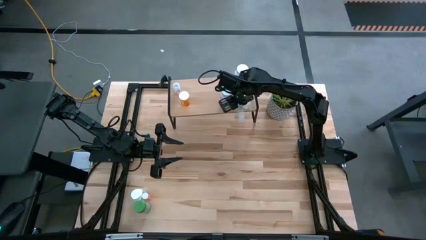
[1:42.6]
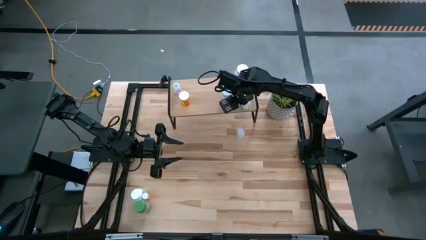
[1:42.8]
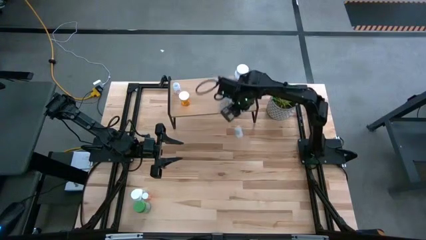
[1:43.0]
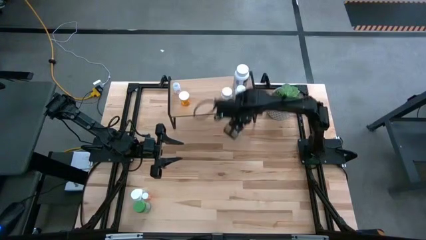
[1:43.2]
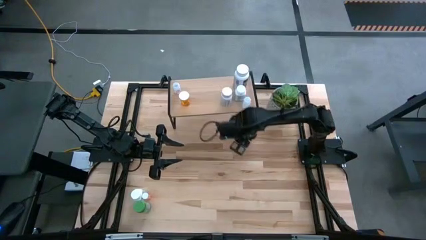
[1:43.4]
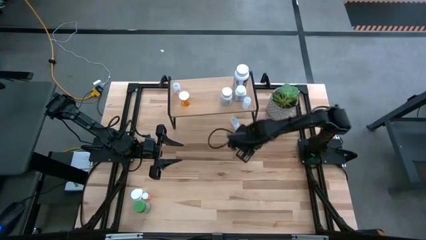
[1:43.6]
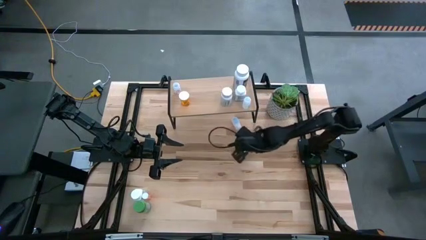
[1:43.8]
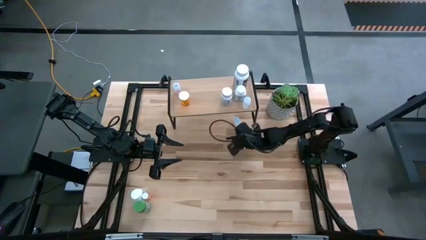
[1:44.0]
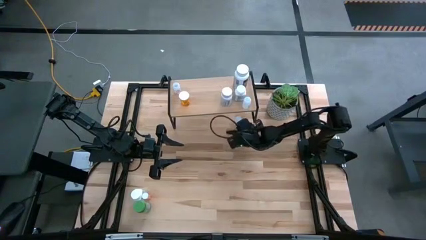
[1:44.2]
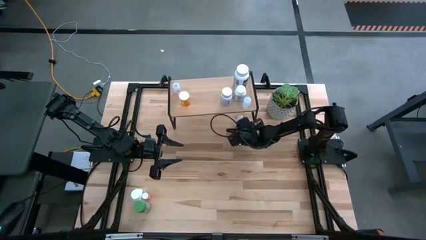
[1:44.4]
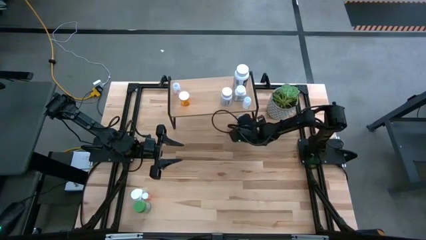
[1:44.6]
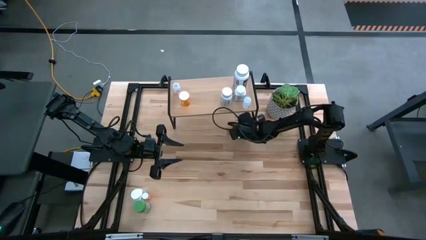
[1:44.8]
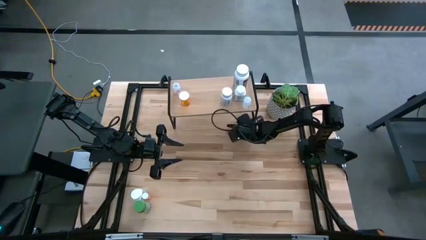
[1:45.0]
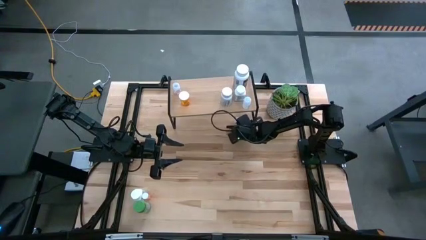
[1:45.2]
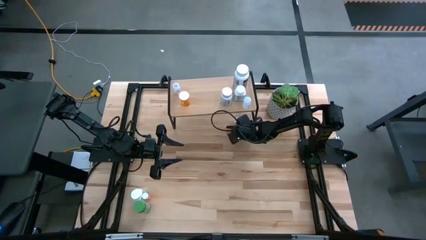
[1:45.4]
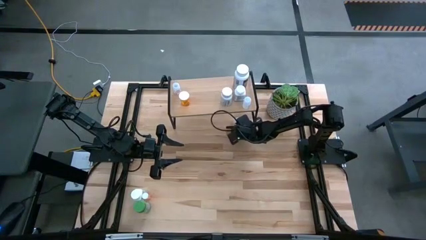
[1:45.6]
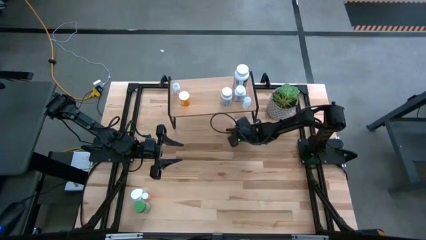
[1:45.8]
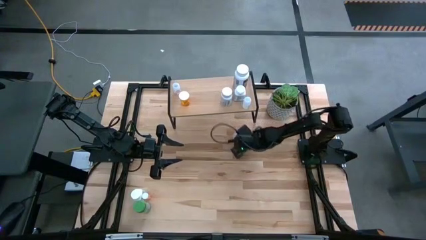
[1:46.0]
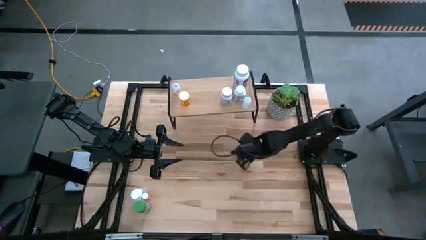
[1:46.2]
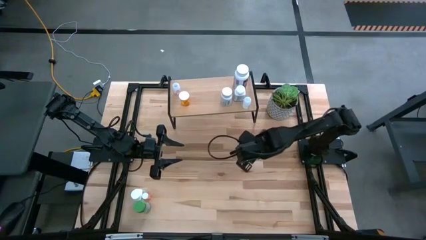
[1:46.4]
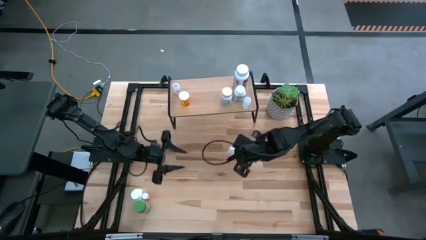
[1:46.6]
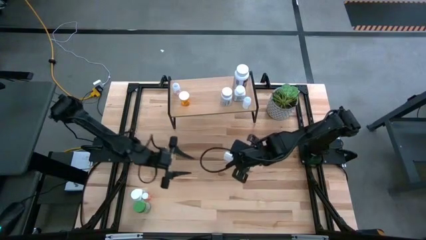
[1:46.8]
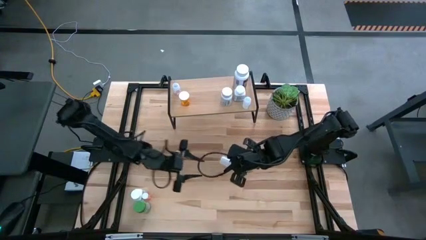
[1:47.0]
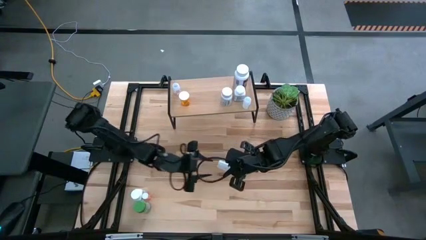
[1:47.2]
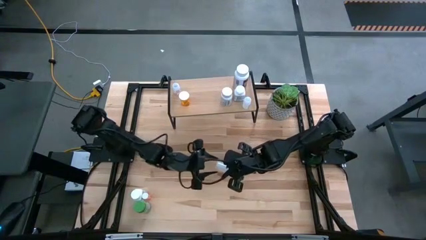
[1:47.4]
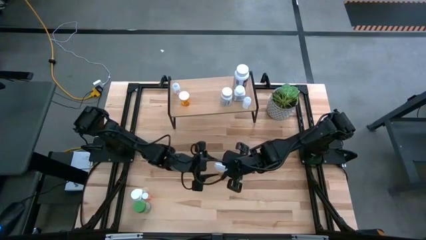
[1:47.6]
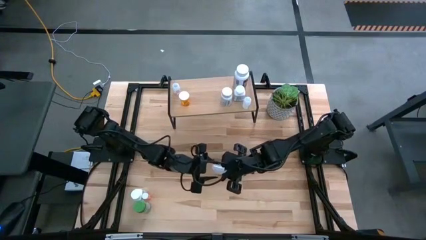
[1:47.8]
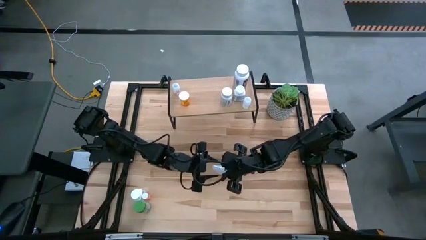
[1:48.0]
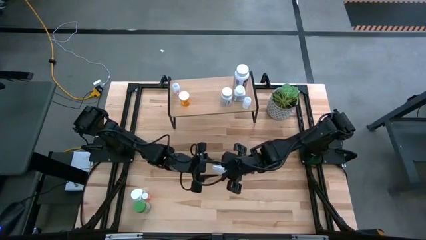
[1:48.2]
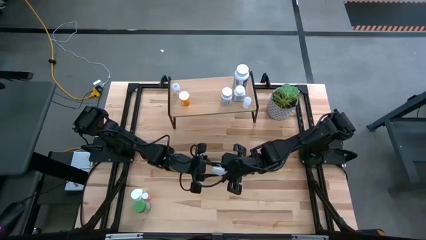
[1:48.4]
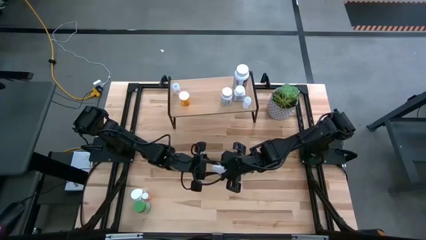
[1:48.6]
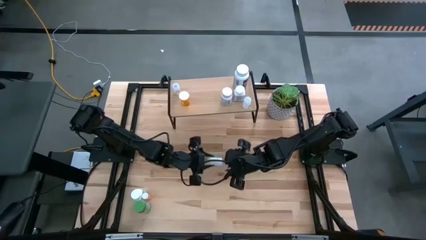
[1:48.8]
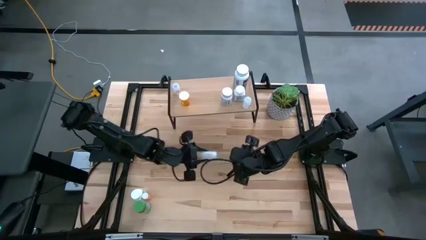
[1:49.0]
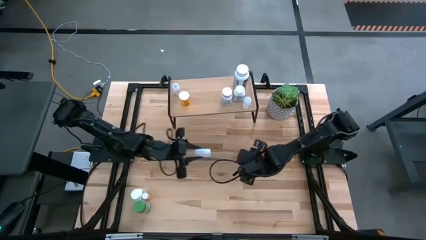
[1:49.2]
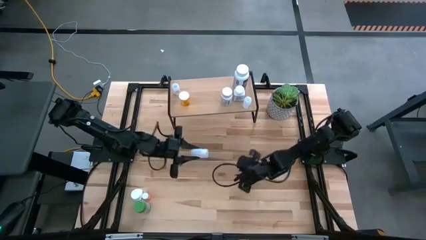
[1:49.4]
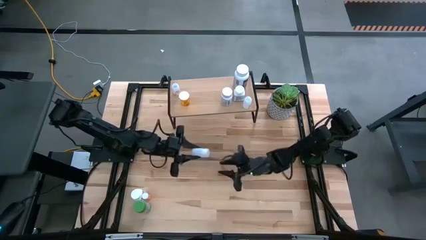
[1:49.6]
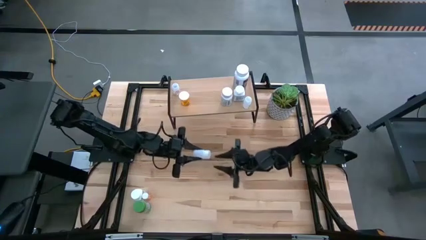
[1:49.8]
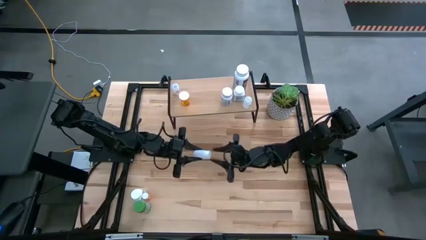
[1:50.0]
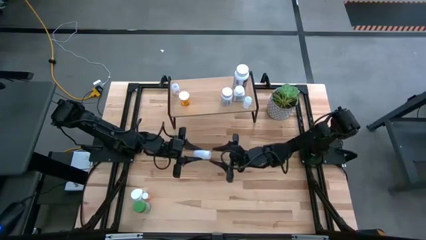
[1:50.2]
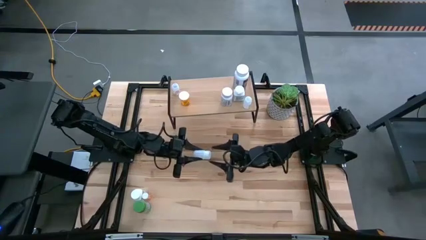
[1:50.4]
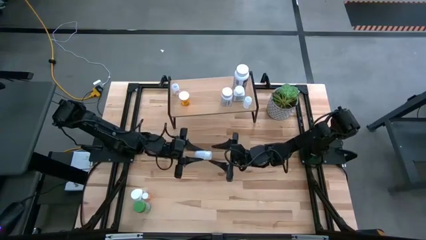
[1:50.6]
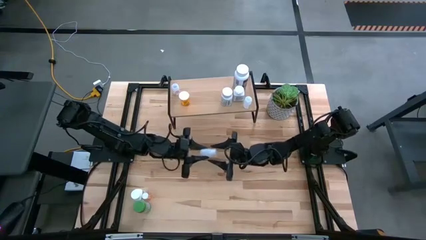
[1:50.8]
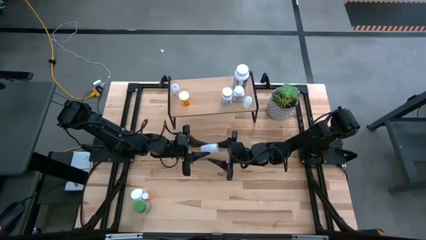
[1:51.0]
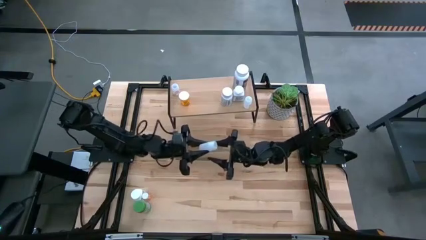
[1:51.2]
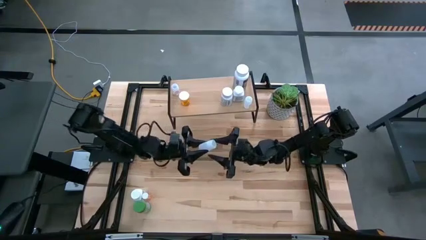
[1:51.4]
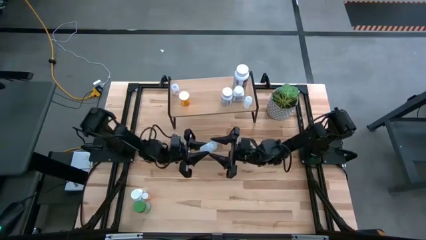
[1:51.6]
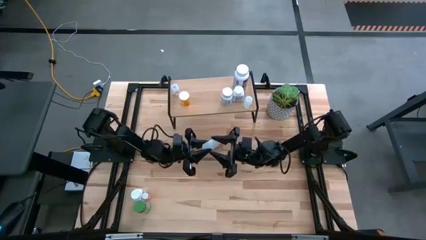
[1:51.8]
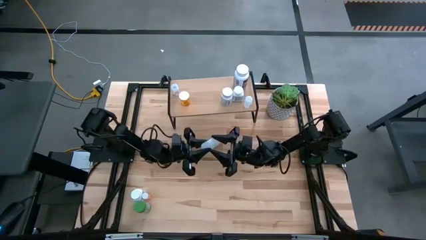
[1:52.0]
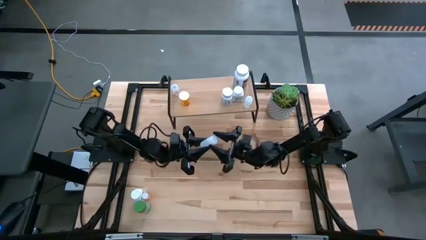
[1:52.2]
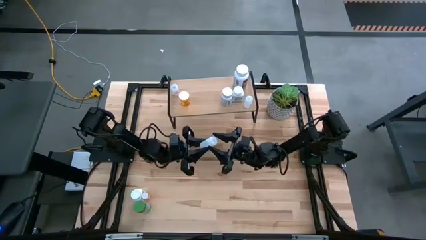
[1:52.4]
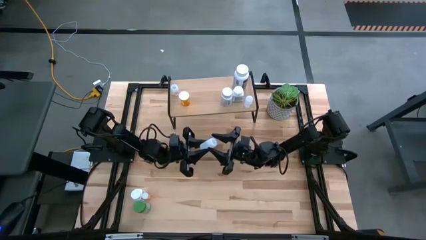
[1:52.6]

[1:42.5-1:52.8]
Task: Pick and place medicine bottles onto shelf by color
Put the transparent pill bottle on the shelf

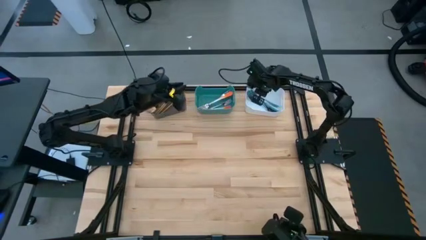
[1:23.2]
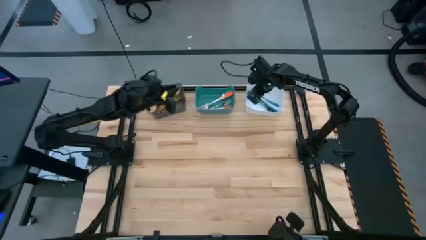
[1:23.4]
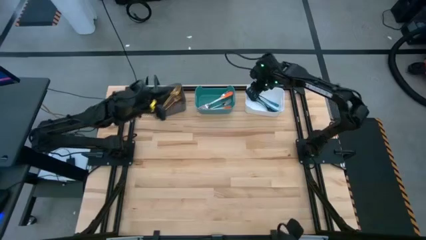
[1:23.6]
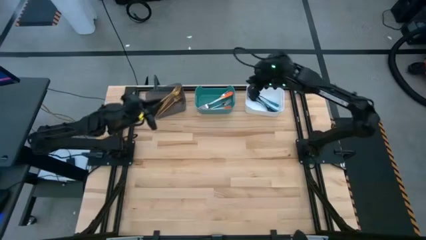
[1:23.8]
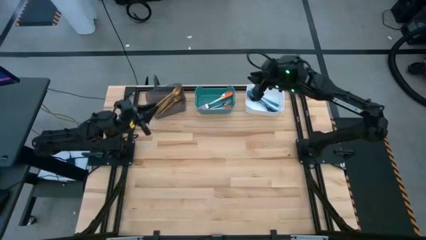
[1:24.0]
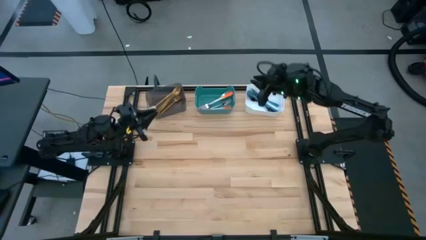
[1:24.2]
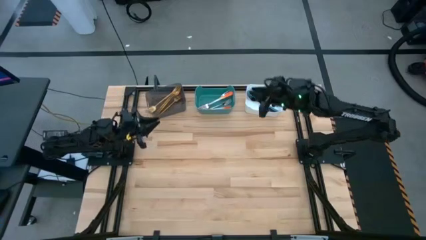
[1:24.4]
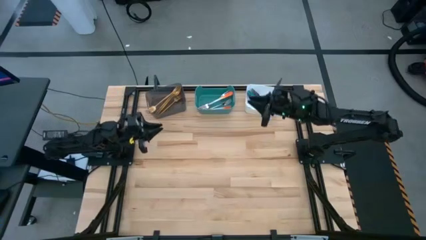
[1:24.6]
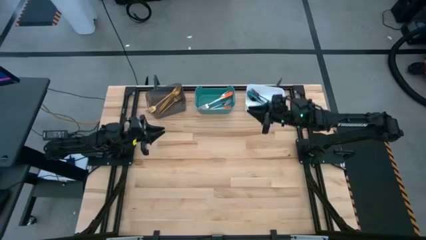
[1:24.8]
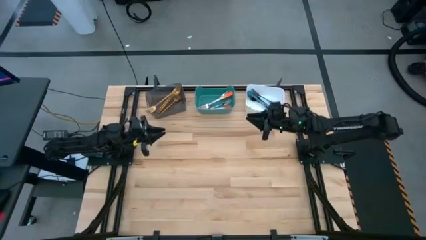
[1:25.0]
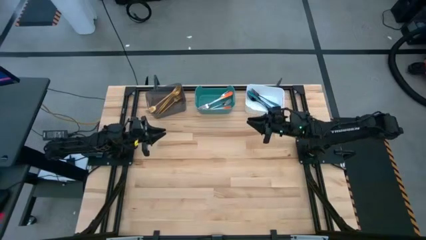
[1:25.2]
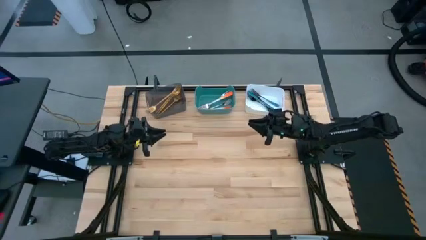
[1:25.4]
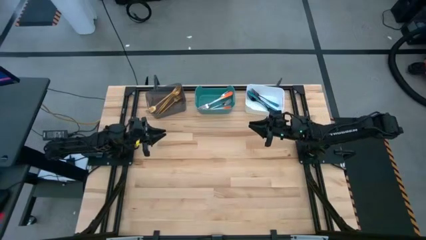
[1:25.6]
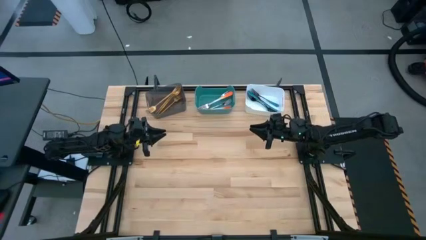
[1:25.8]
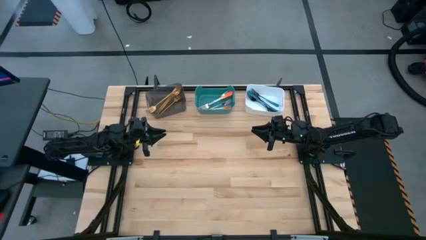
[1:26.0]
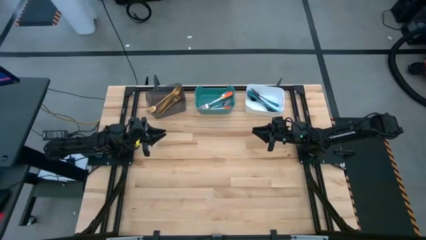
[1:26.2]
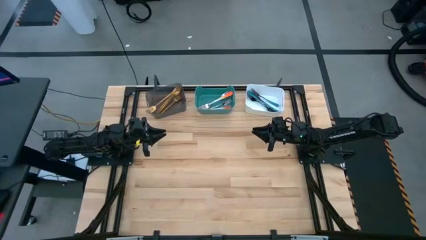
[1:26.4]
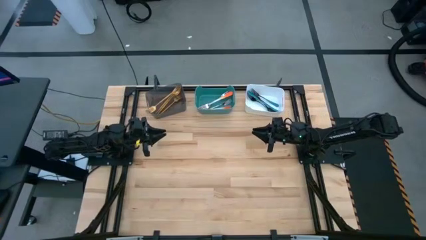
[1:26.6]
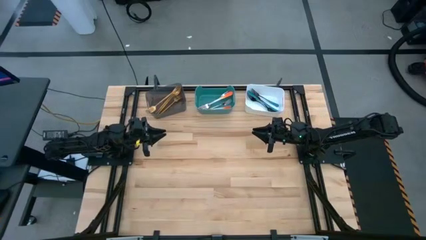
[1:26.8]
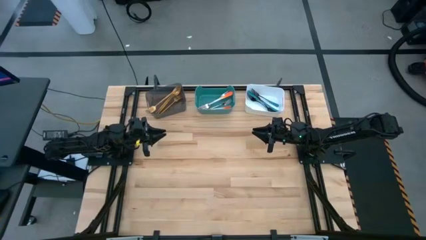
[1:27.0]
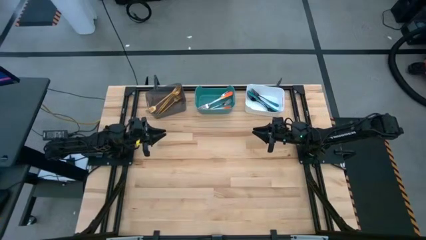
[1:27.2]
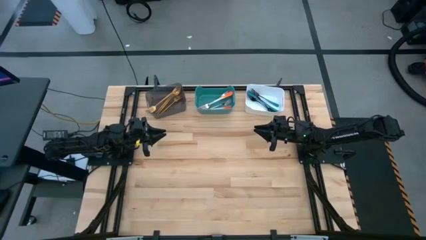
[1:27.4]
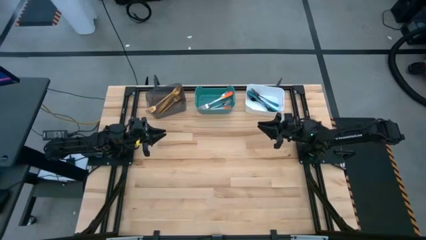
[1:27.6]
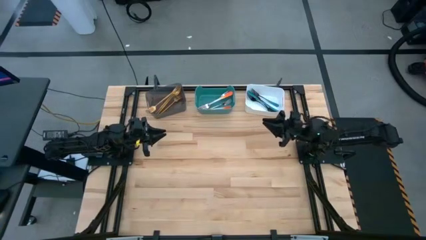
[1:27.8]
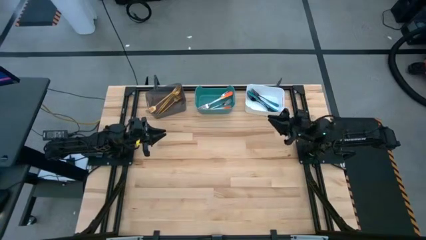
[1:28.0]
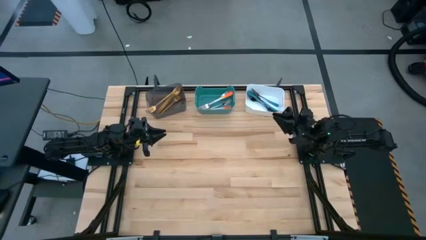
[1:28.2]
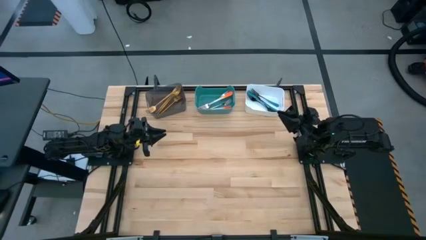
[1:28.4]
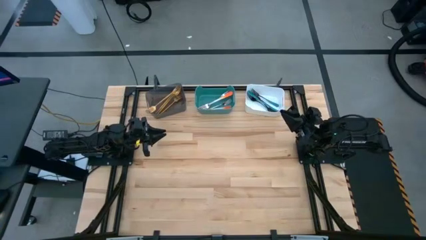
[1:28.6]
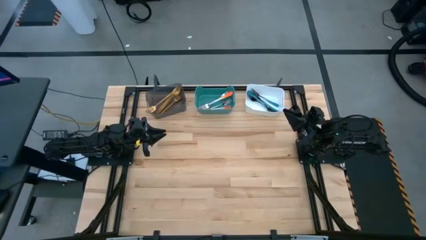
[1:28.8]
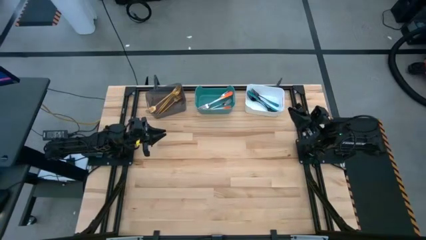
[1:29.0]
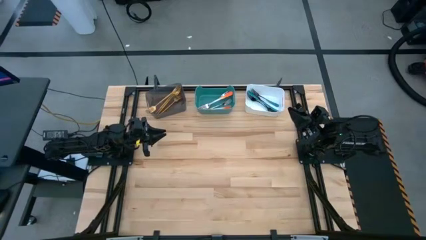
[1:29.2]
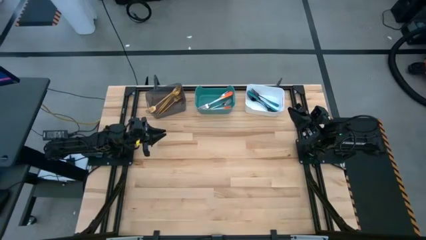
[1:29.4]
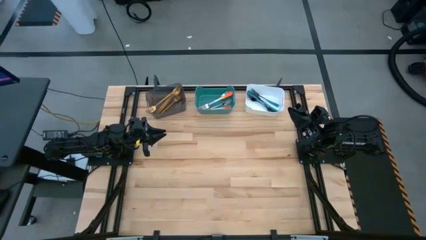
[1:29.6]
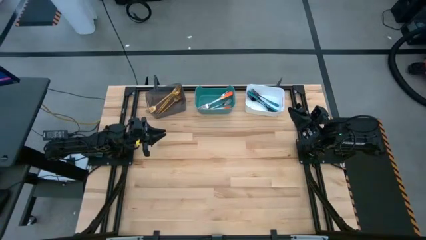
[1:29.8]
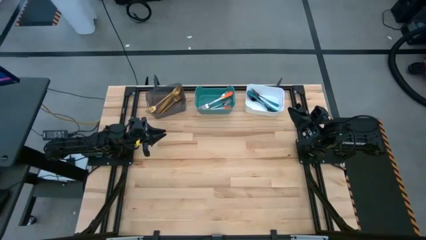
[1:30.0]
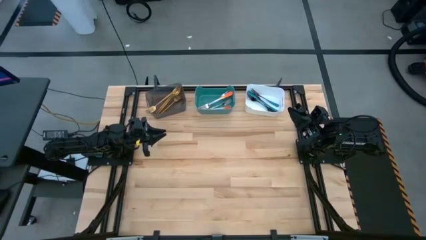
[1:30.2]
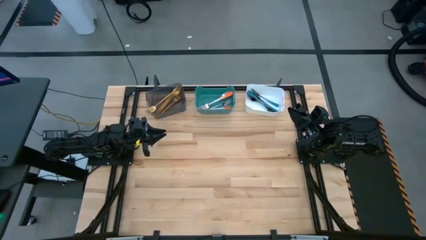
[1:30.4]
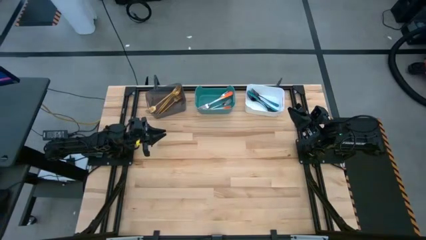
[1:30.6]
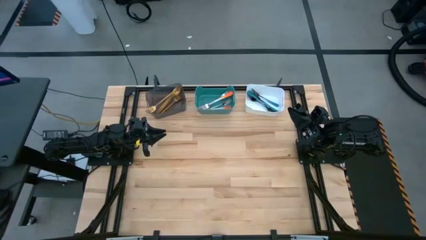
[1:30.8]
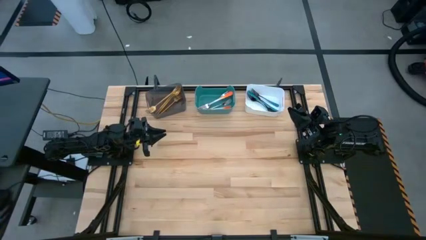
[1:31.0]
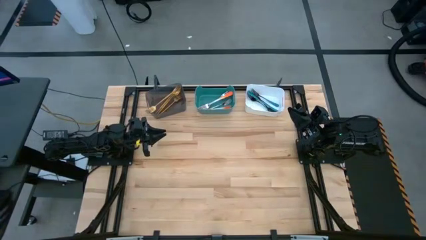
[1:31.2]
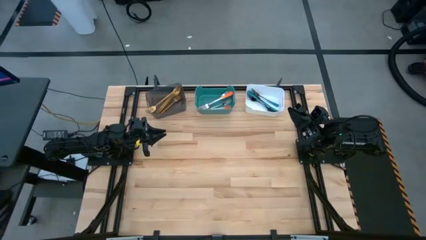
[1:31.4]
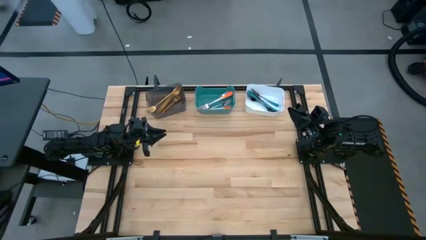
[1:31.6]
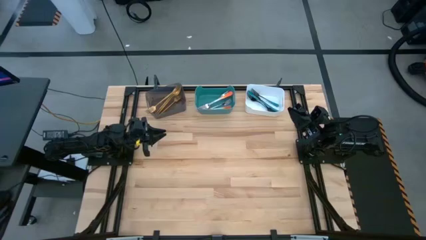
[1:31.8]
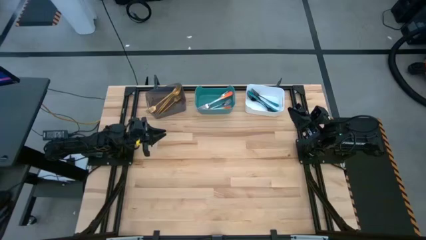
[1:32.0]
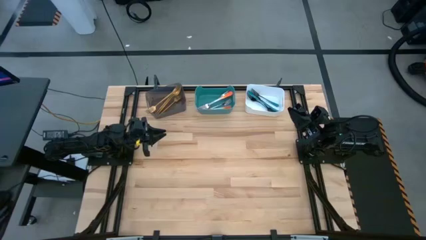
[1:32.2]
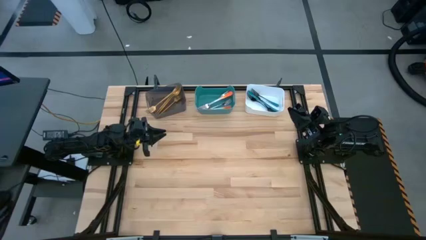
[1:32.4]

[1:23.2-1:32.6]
Task: Sort silverware by color (type)
Return to Home Position
